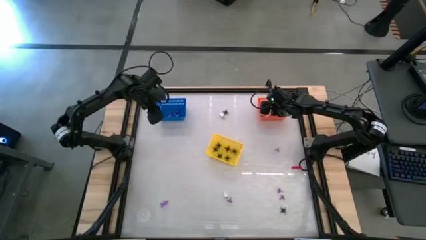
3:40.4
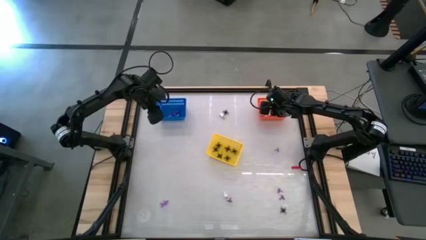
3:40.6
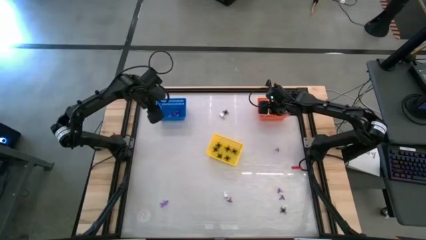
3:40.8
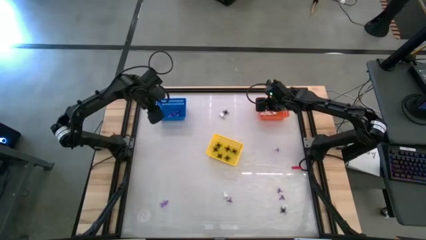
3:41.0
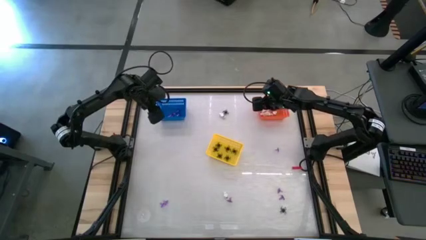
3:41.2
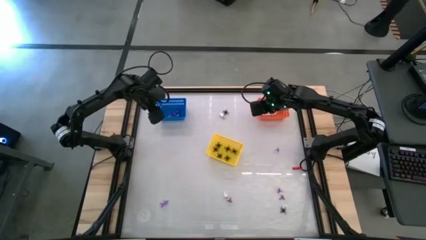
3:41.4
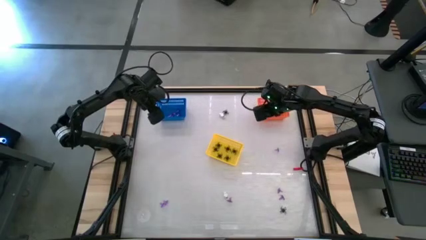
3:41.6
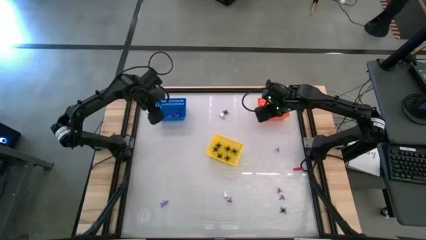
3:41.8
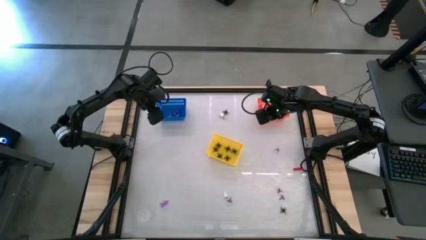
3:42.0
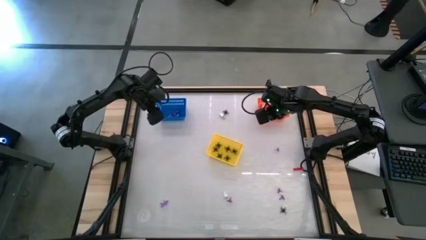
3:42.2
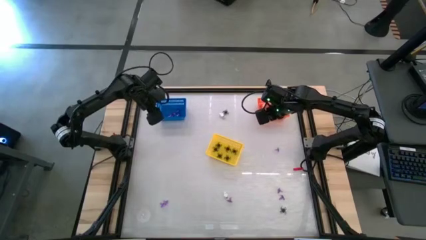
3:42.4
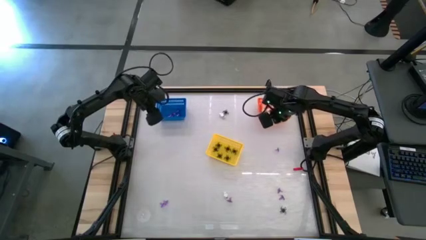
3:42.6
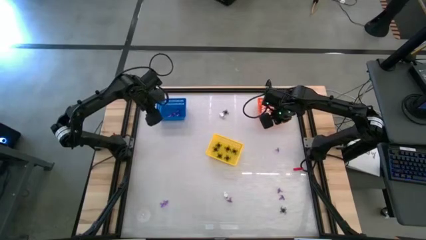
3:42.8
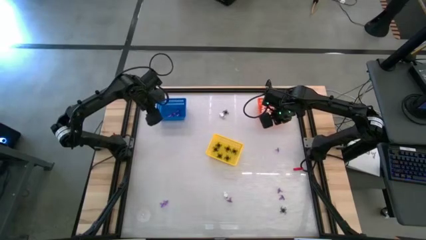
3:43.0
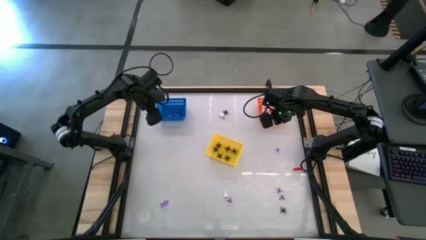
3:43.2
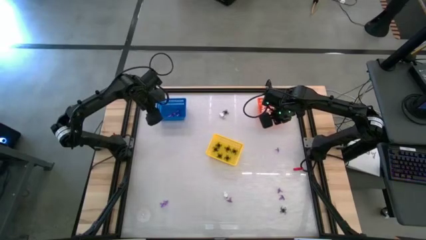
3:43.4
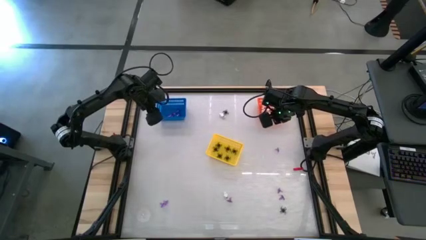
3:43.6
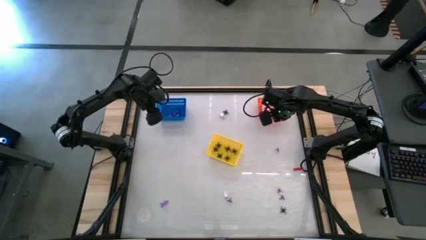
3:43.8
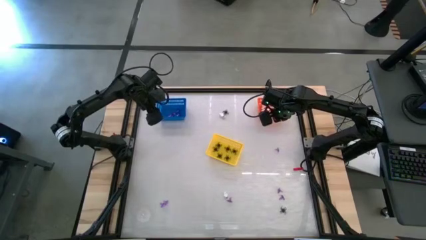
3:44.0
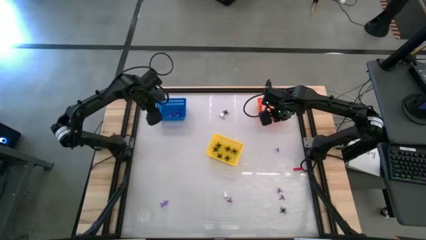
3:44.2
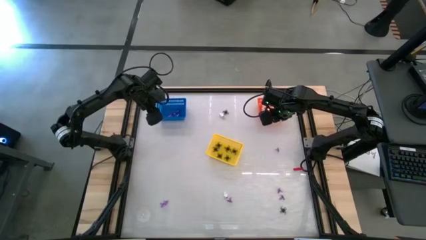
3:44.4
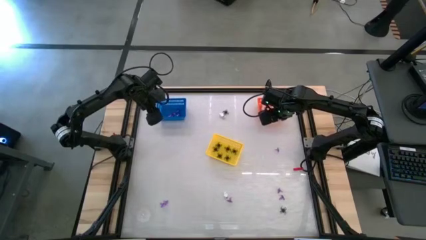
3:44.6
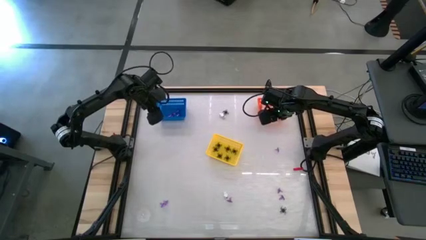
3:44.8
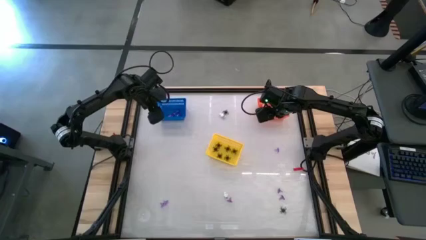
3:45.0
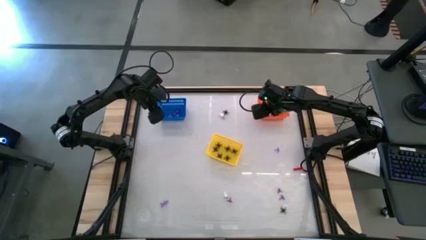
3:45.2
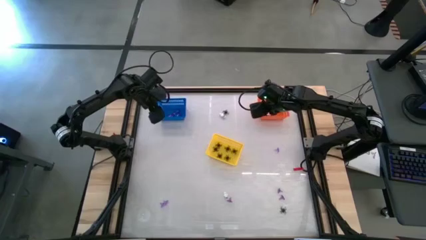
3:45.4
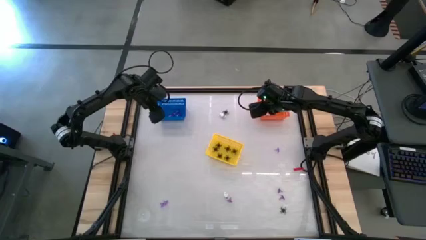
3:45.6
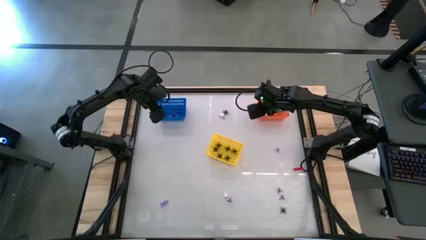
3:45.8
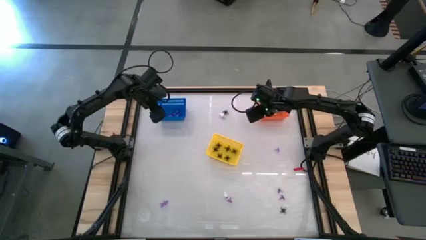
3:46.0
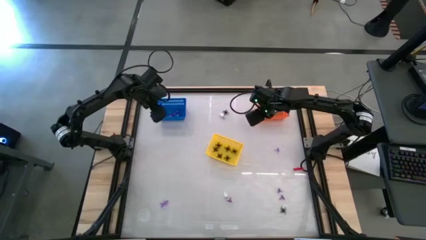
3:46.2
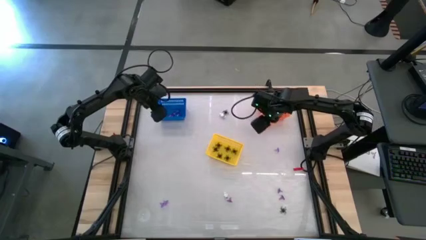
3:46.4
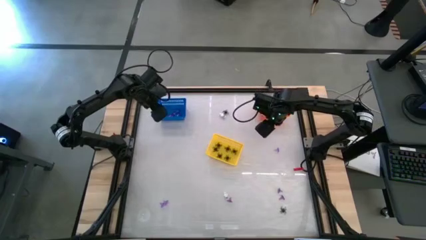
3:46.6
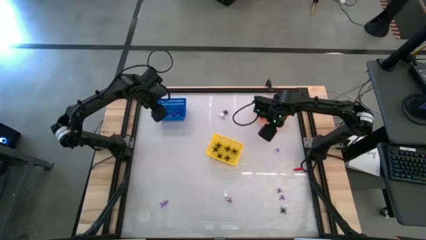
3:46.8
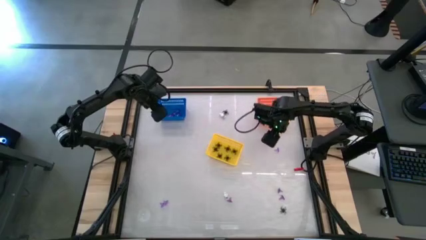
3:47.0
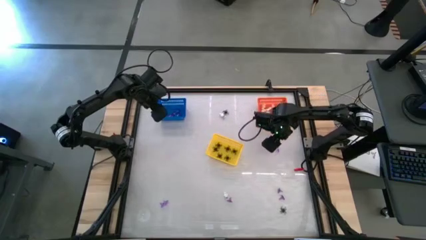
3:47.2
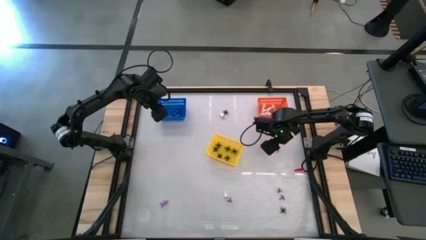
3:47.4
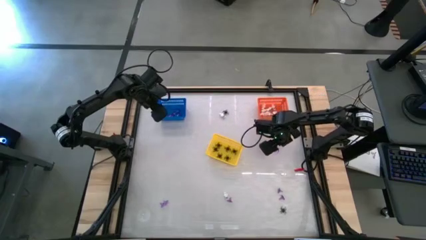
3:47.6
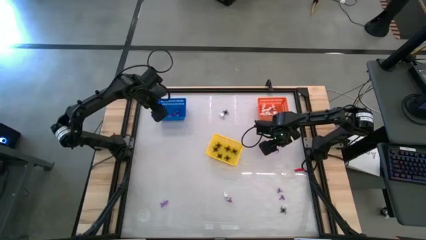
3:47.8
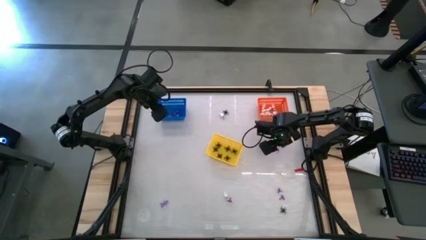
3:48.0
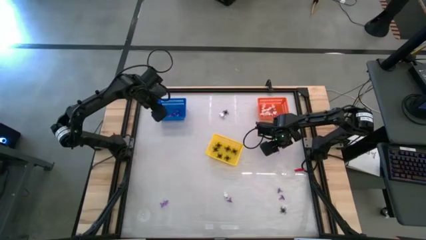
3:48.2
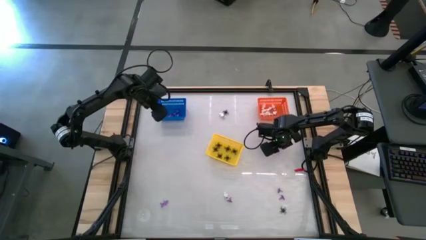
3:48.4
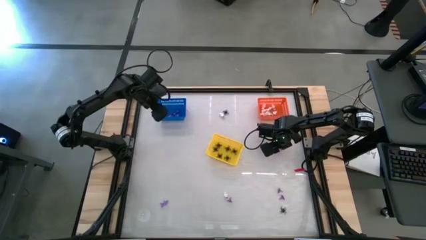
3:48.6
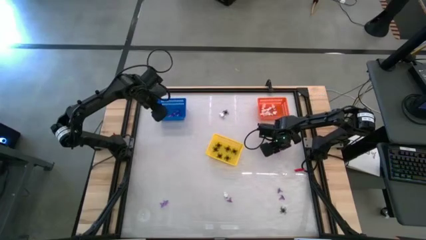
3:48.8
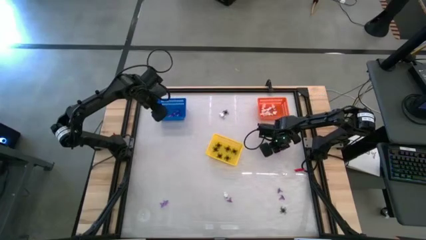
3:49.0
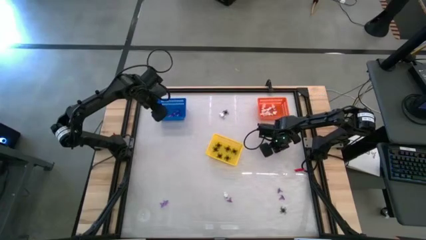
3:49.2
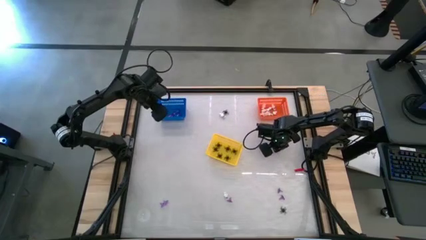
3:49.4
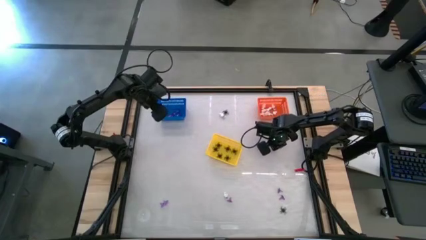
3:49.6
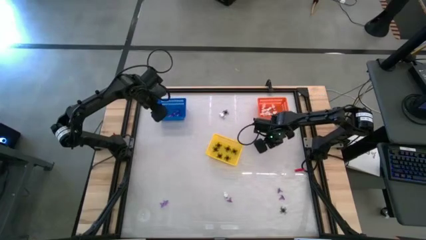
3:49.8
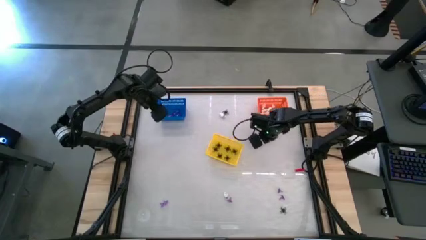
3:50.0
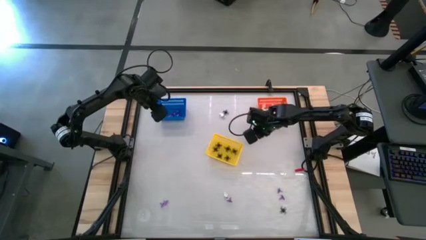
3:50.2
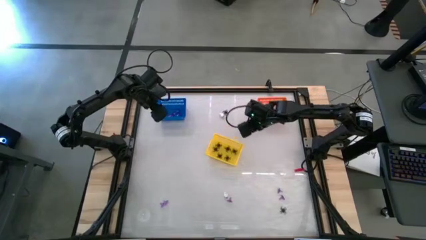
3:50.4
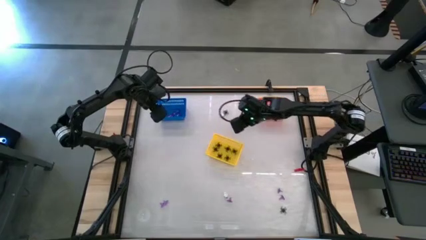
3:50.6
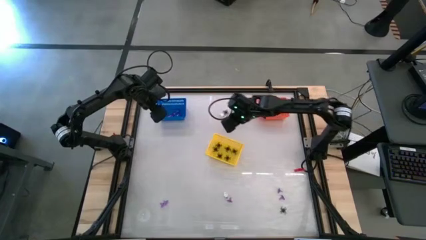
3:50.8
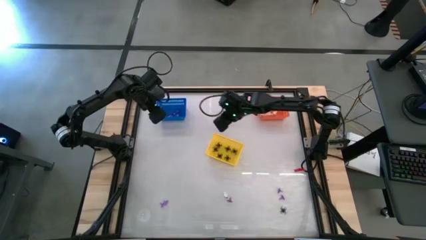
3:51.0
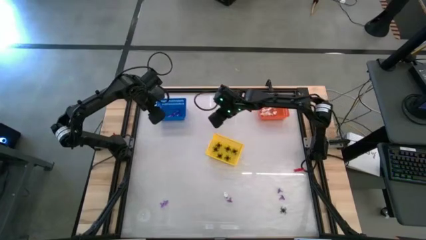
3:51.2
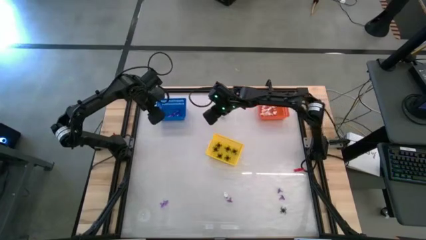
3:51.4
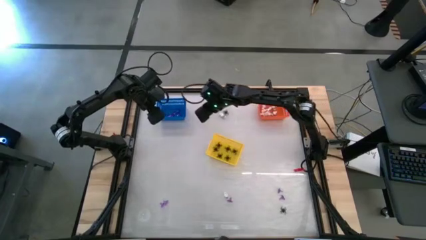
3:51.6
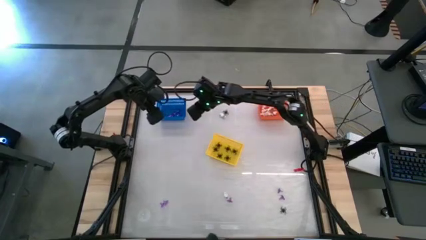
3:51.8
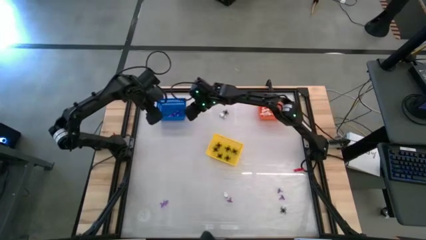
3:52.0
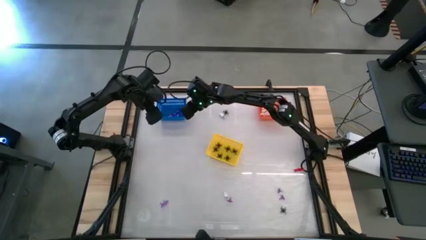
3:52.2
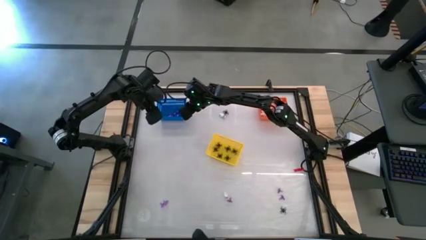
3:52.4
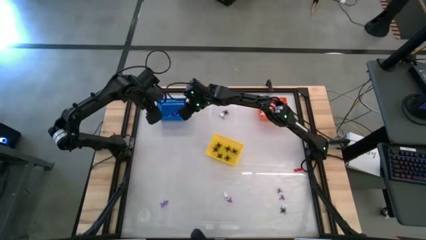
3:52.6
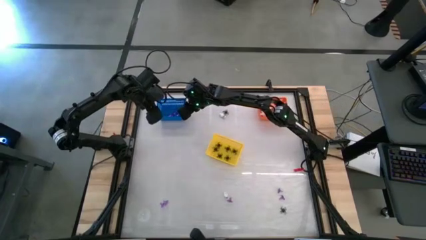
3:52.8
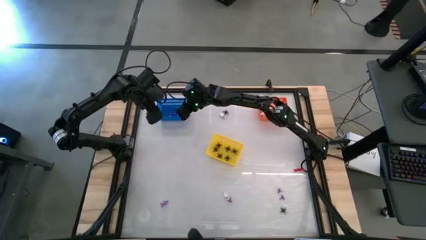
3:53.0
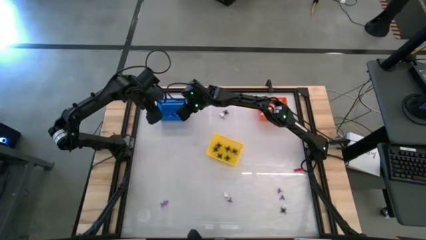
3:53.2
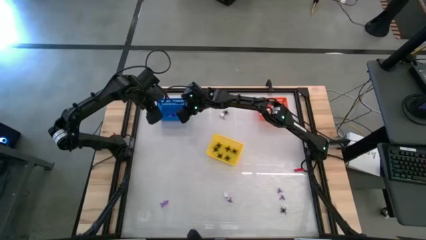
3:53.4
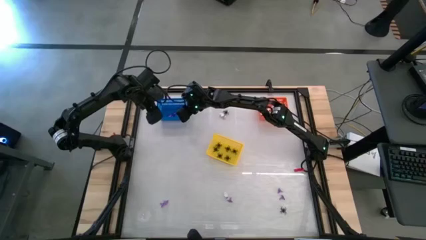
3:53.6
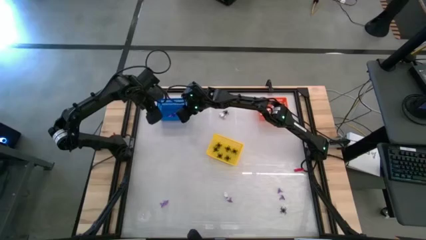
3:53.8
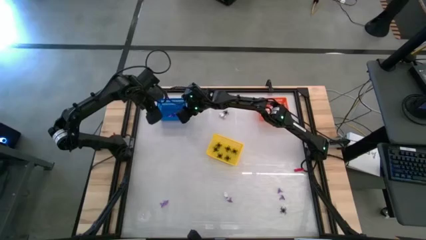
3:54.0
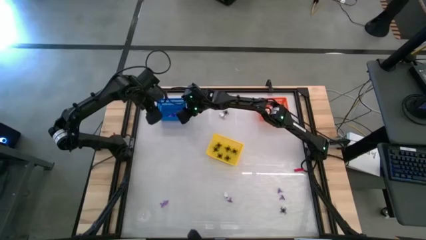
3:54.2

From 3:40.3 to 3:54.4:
Task: Sort Halloween decoration
Put the purple witch hat toy into the blue bin
